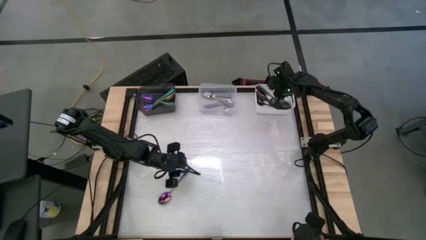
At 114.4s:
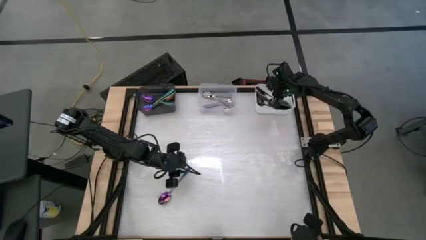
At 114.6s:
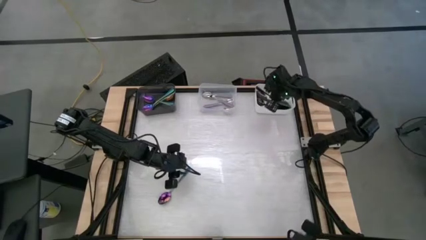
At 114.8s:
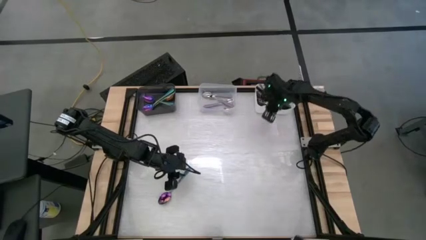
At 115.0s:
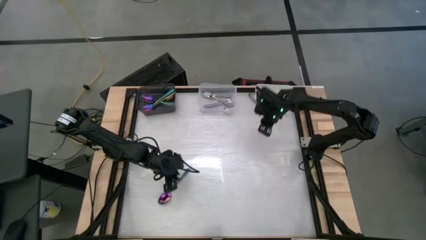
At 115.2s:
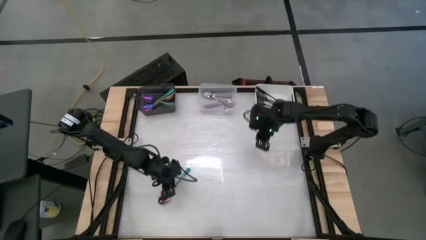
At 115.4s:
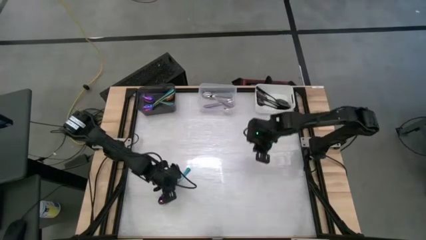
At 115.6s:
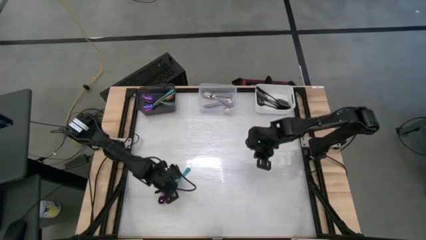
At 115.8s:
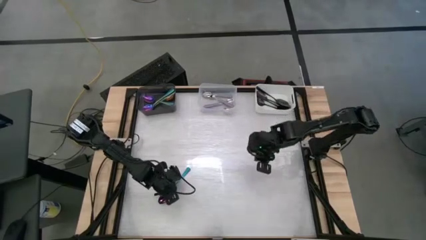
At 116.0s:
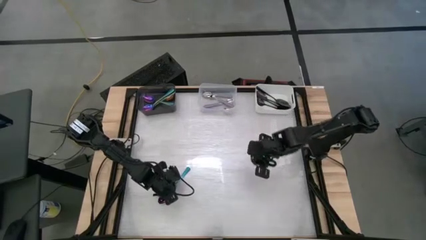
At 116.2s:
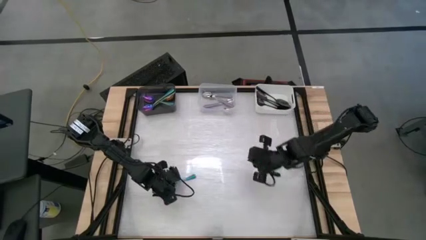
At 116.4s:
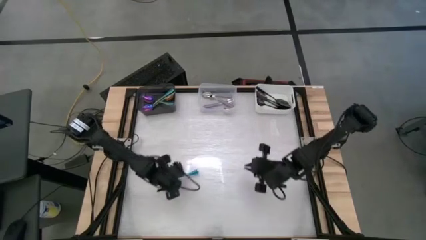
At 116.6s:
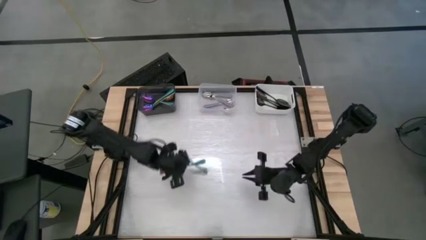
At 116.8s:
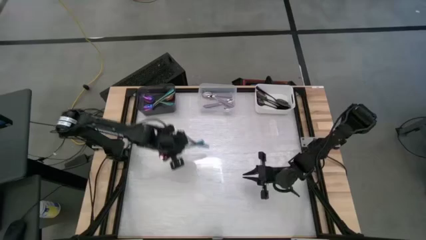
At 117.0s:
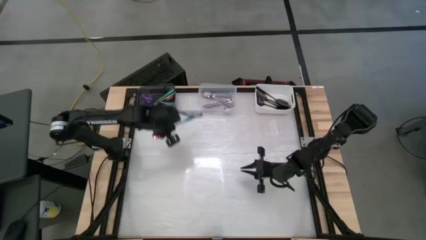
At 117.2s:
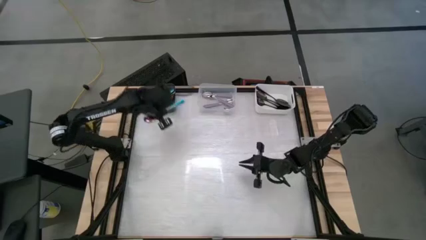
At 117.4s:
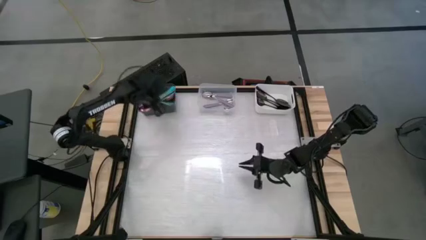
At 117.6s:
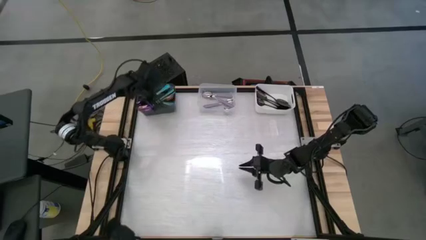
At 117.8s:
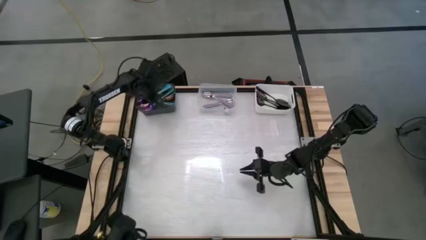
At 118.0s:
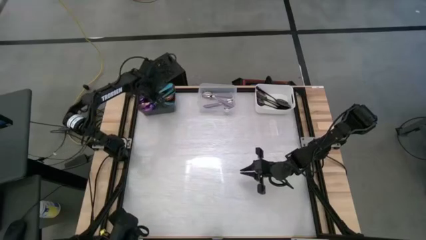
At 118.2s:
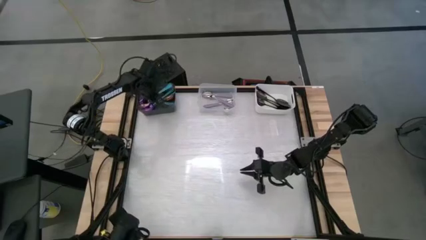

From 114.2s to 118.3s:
Task: Sort silverware by color (type)
Put the blue spoon into the black bin

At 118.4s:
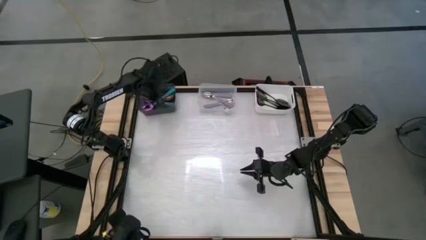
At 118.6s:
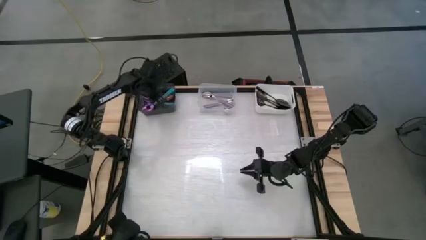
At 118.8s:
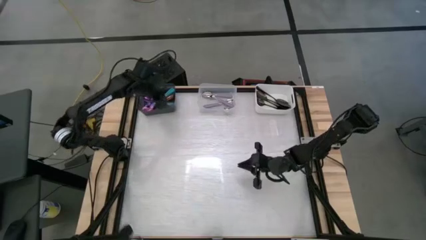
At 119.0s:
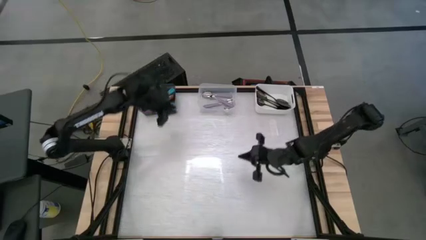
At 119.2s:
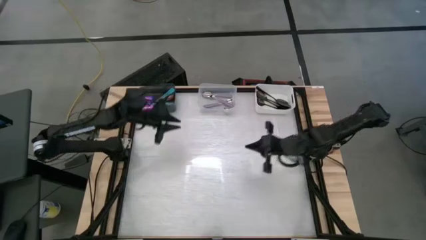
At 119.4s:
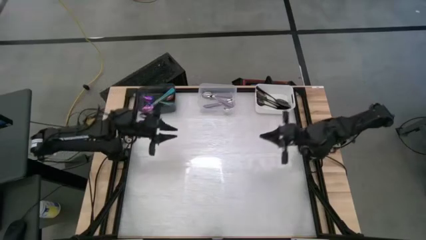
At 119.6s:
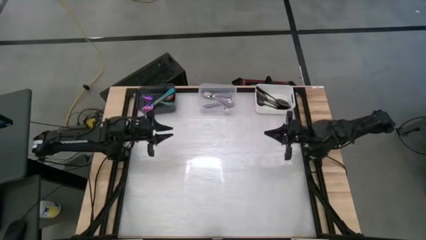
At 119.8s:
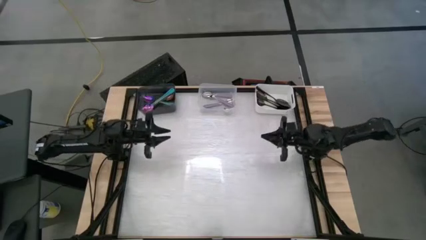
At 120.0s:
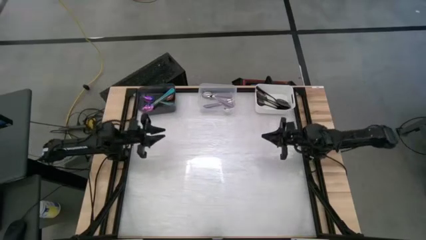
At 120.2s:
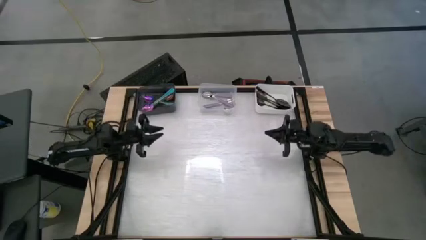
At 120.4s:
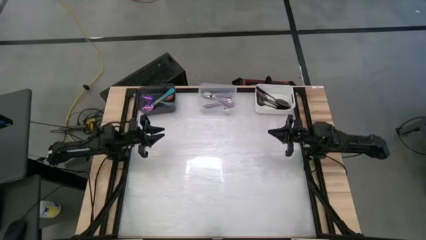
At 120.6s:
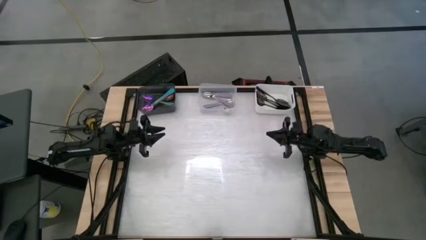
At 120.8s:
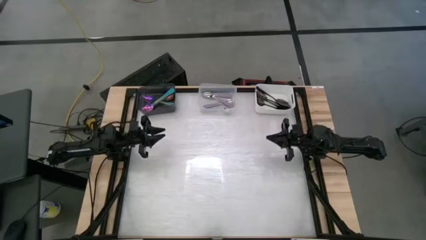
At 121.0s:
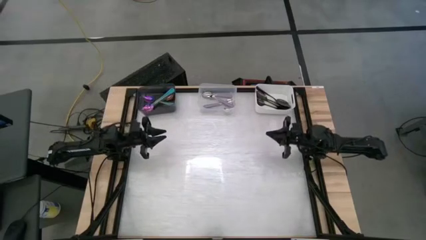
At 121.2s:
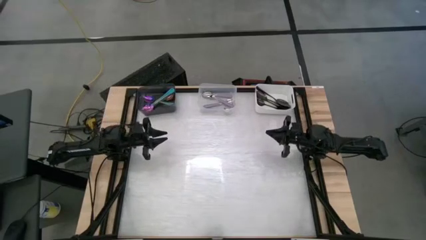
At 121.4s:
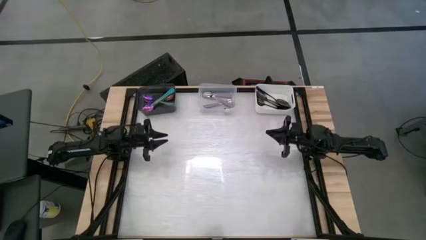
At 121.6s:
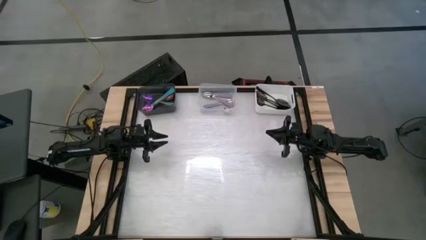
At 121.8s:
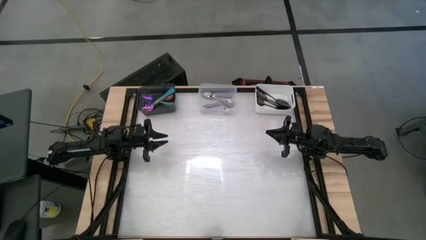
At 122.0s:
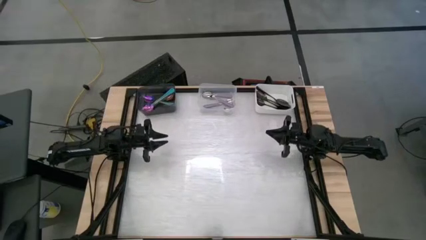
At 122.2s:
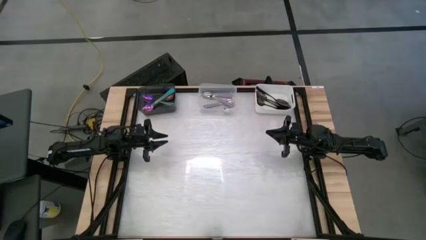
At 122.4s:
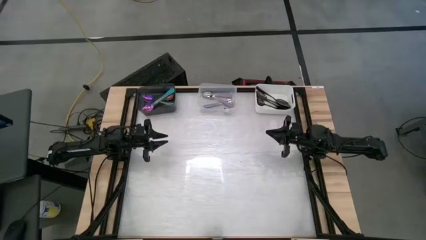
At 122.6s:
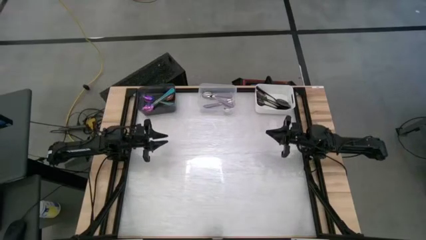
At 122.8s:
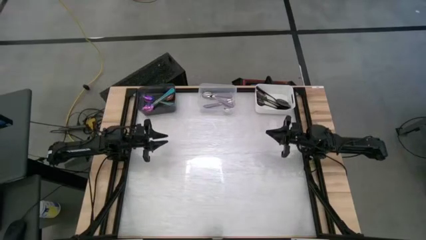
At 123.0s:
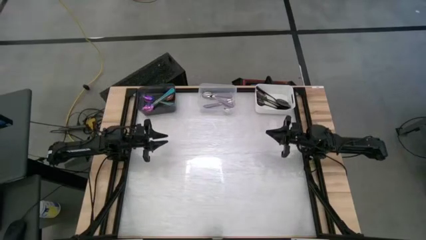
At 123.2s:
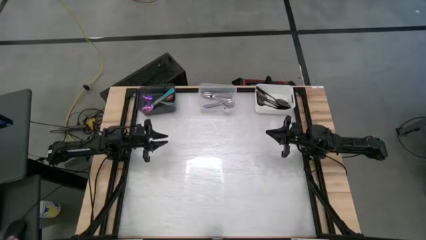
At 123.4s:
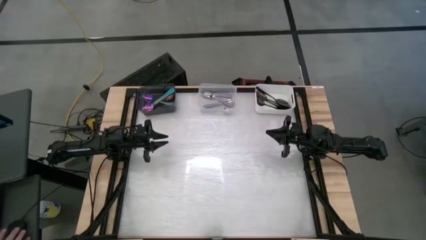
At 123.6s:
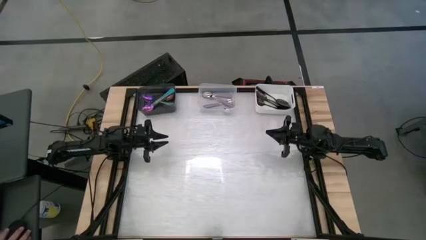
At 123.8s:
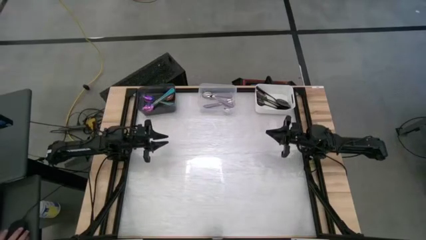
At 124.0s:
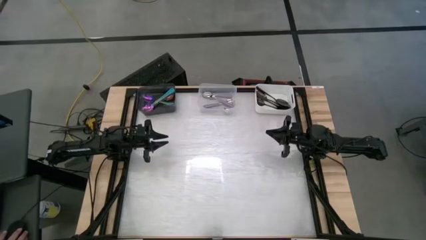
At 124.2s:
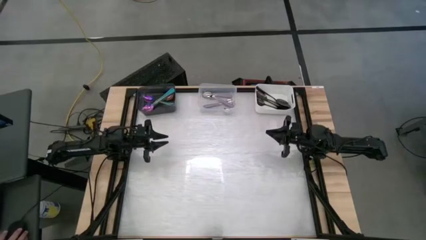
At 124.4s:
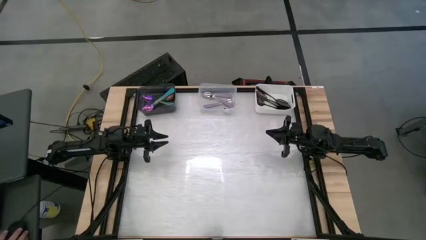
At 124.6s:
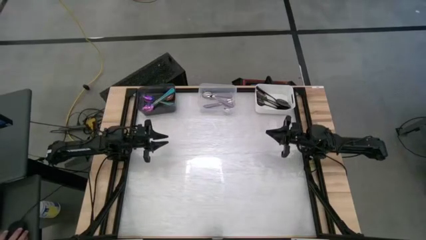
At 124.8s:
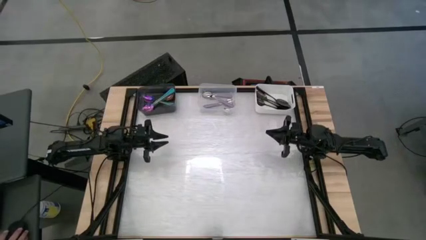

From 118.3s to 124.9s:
Return to Home Position

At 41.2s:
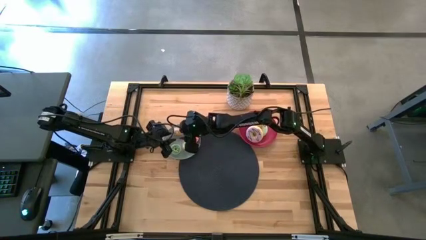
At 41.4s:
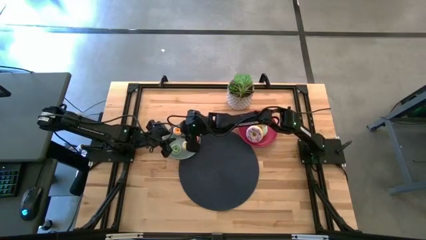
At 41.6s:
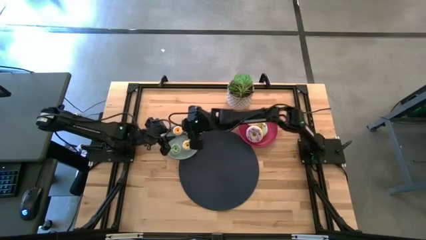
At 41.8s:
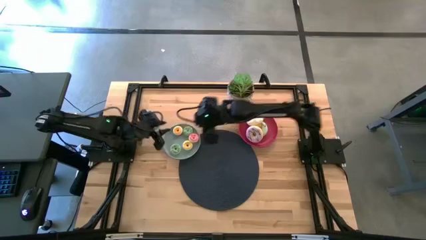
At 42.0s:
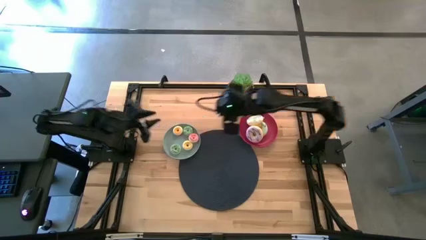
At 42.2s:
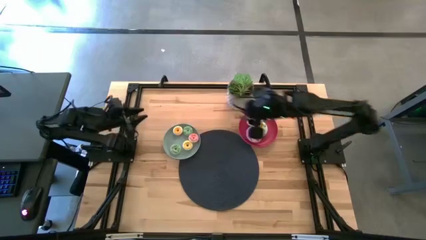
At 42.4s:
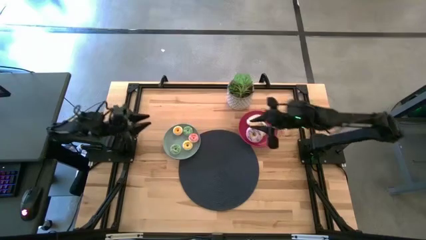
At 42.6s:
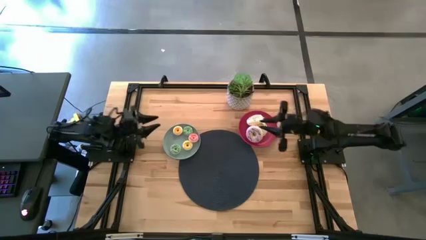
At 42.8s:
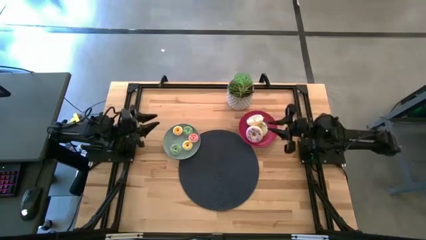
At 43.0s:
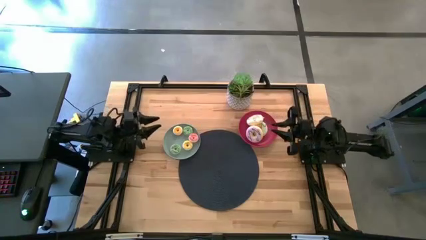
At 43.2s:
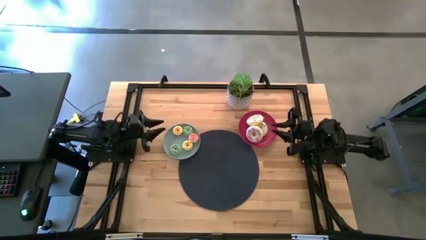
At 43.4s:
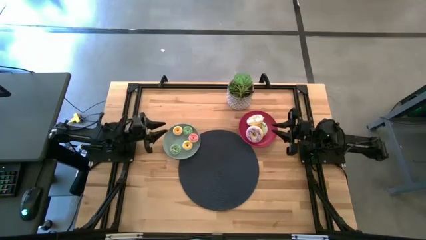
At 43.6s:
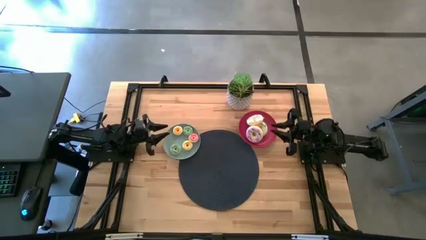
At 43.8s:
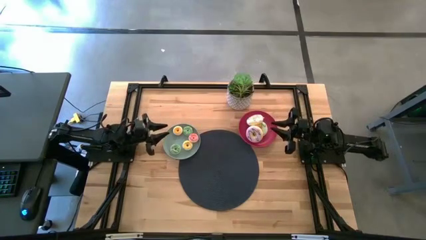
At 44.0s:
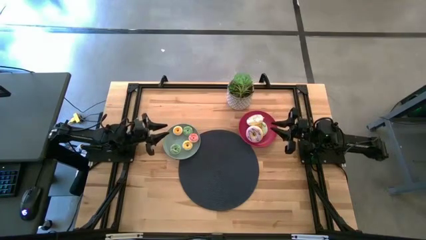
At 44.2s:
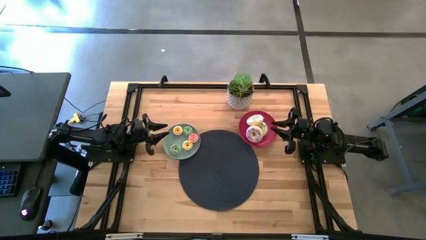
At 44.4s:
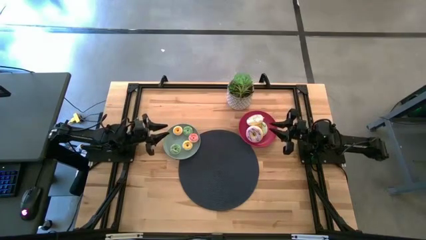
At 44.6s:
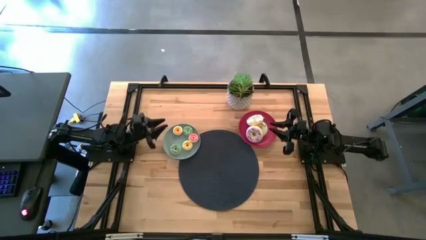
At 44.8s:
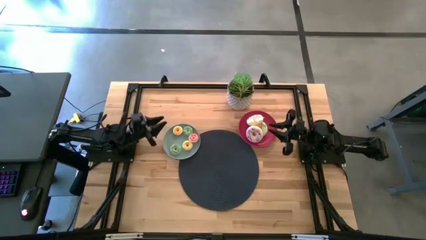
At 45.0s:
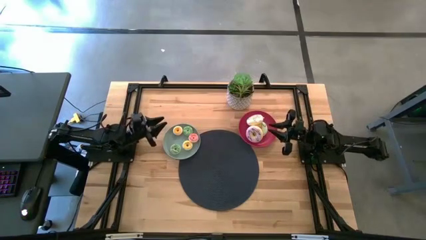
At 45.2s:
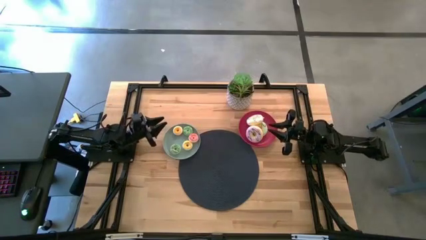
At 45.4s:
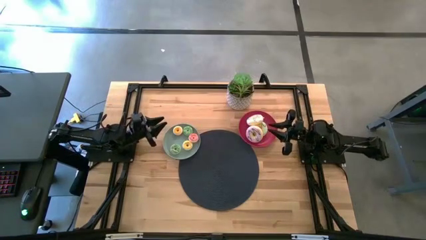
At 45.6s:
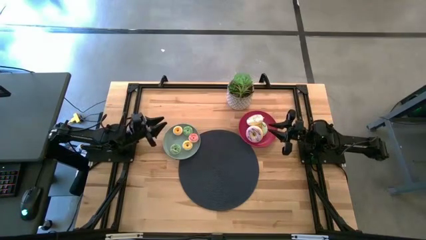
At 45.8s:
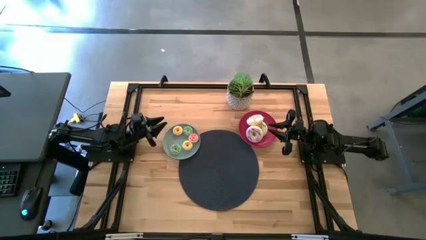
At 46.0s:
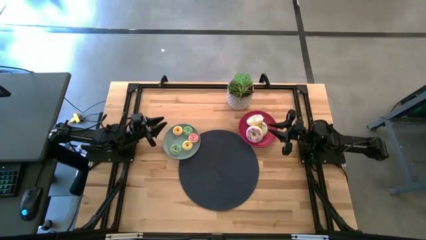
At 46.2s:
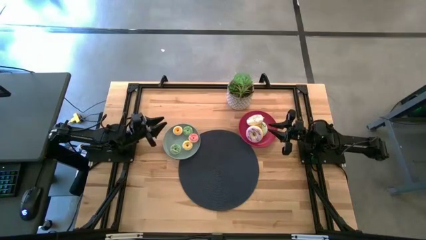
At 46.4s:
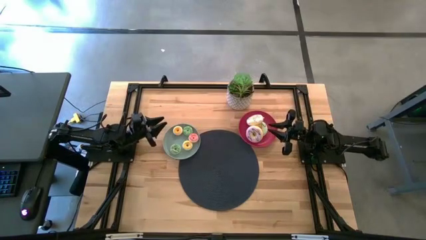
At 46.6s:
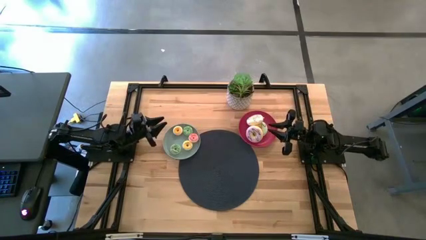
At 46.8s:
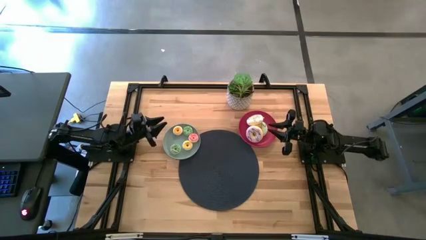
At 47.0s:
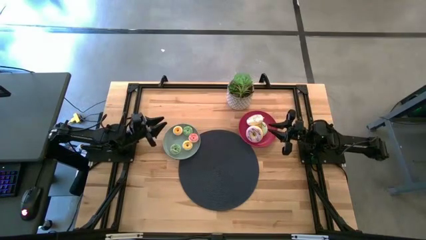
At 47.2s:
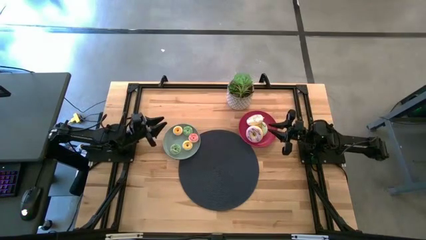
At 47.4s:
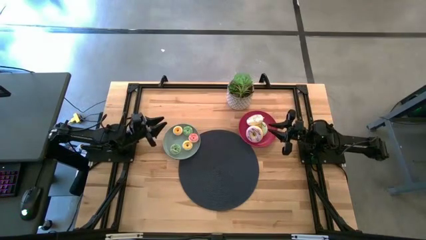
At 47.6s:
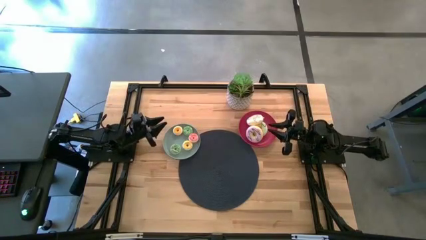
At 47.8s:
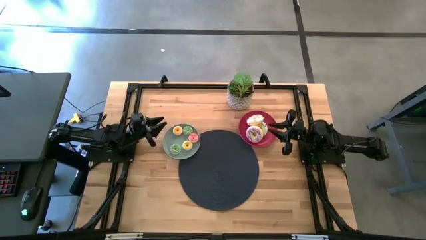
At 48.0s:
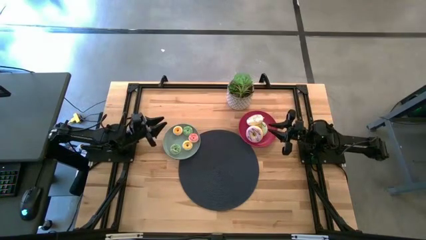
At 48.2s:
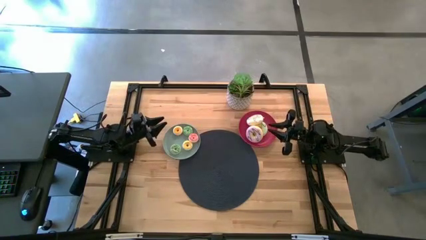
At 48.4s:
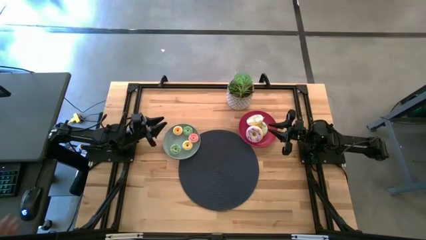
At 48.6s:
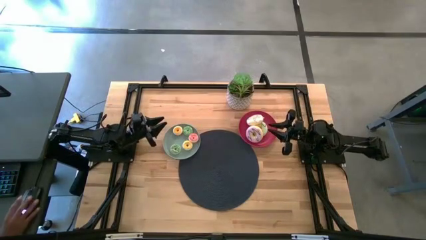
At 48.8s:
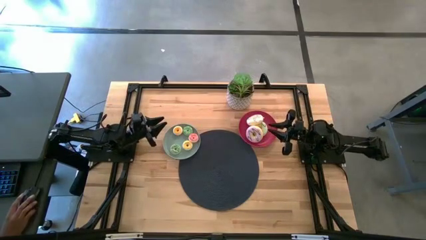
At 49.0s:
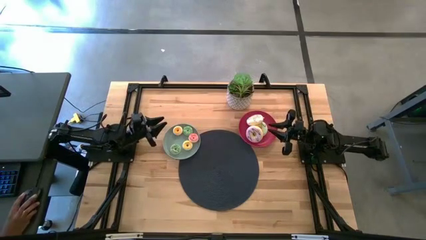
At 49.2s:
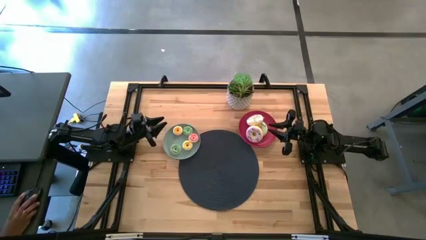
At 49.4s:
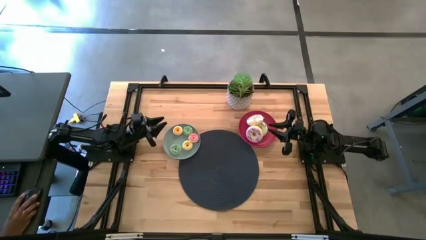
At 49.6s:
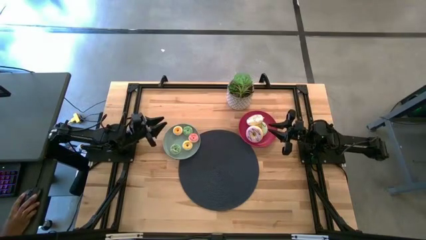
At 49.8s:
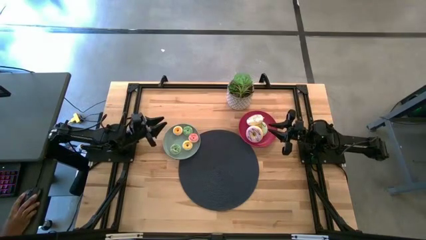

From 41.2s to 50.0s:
Task: Pick & Place donuts
Return to Home Position
